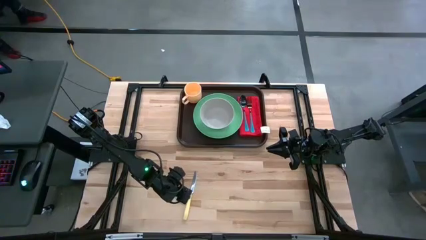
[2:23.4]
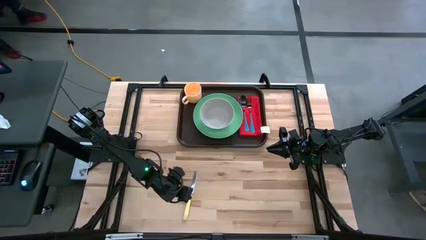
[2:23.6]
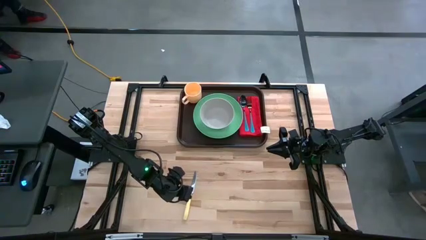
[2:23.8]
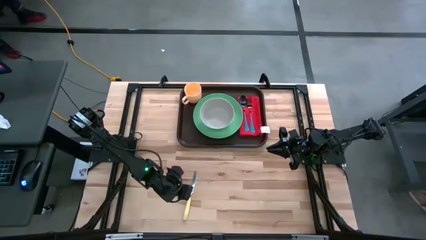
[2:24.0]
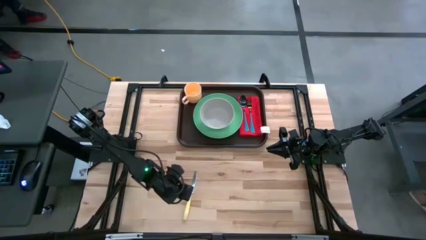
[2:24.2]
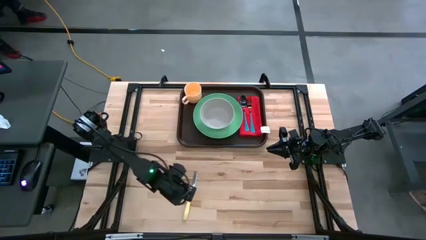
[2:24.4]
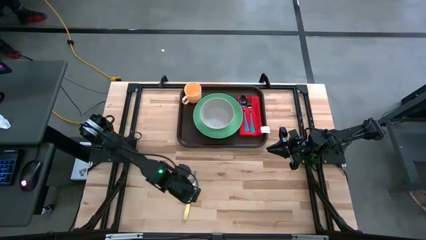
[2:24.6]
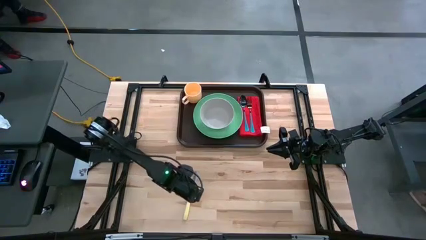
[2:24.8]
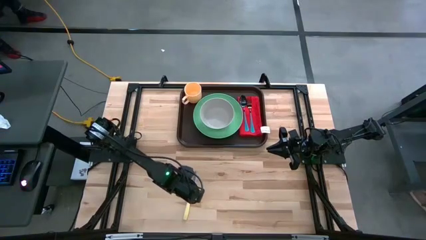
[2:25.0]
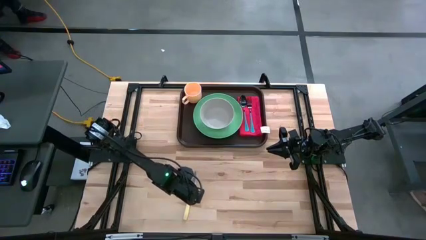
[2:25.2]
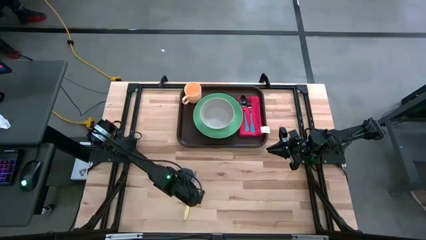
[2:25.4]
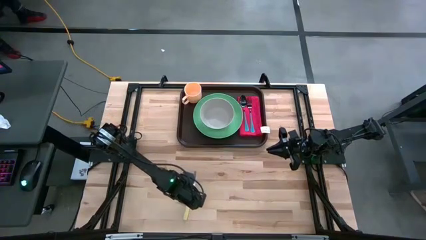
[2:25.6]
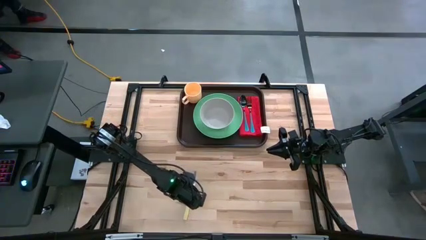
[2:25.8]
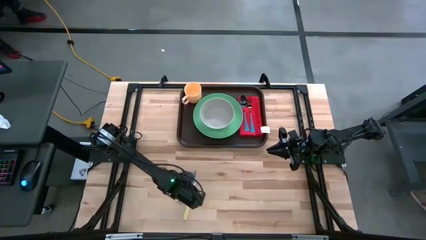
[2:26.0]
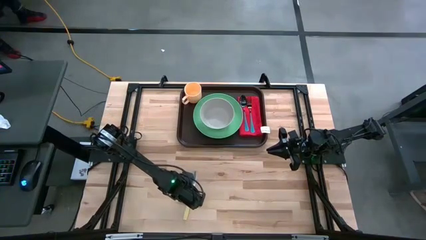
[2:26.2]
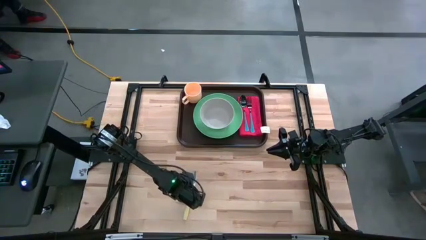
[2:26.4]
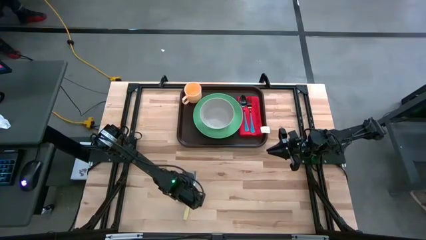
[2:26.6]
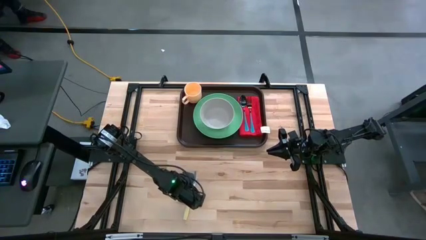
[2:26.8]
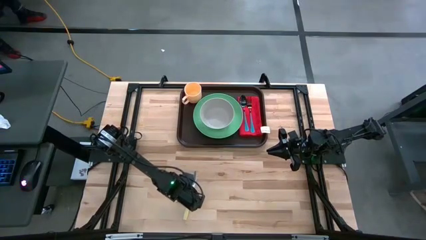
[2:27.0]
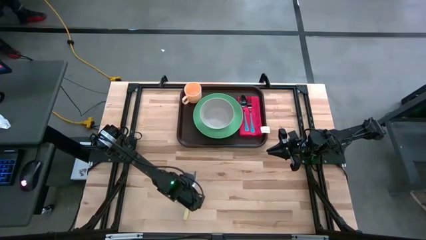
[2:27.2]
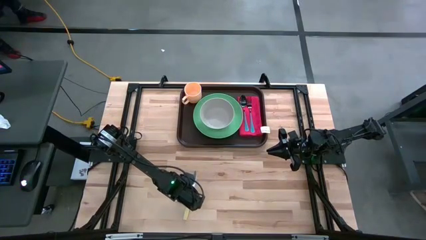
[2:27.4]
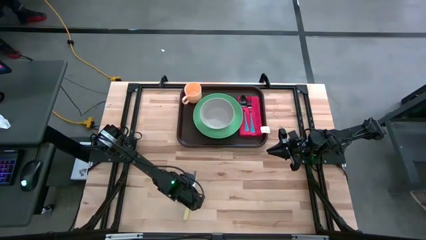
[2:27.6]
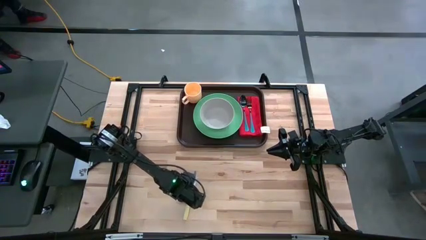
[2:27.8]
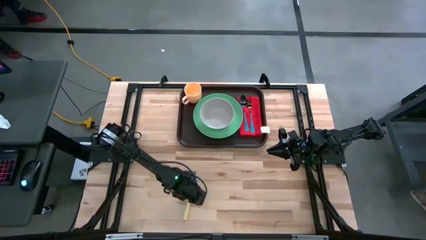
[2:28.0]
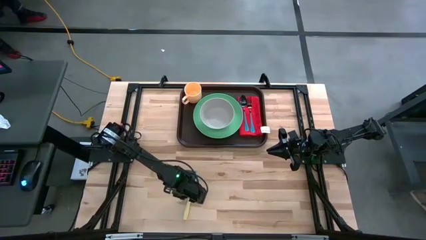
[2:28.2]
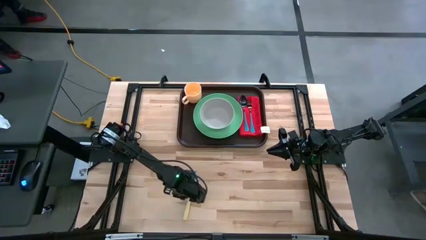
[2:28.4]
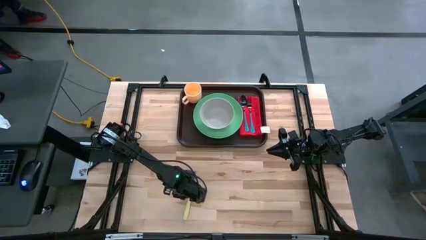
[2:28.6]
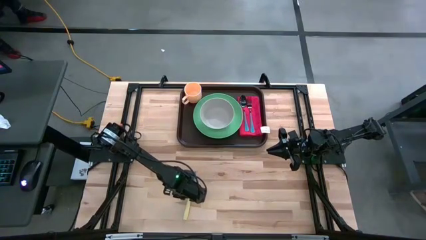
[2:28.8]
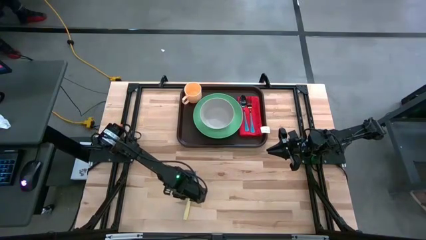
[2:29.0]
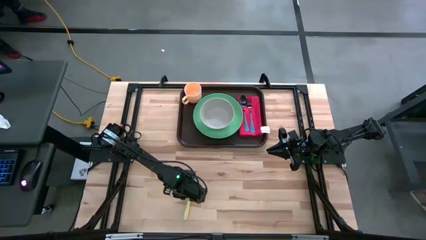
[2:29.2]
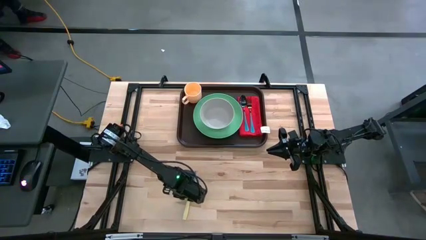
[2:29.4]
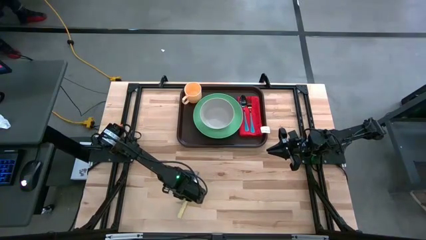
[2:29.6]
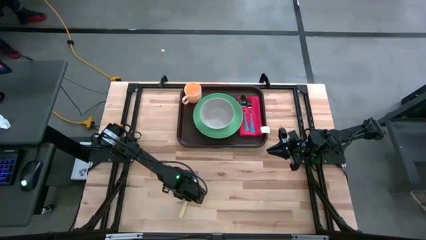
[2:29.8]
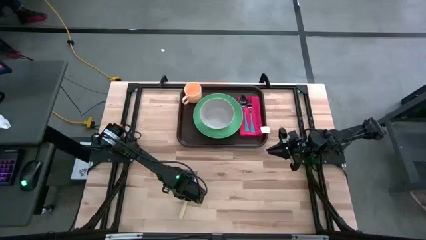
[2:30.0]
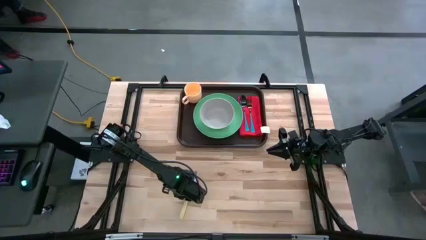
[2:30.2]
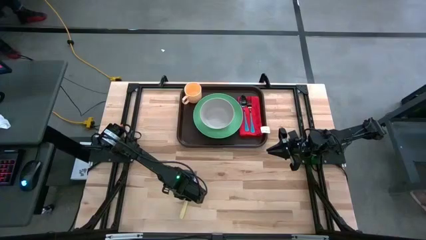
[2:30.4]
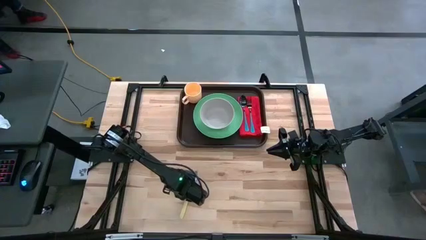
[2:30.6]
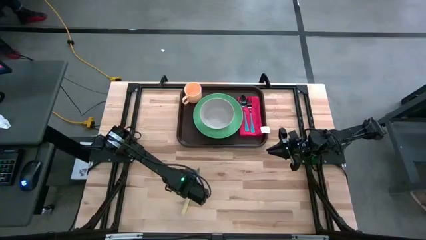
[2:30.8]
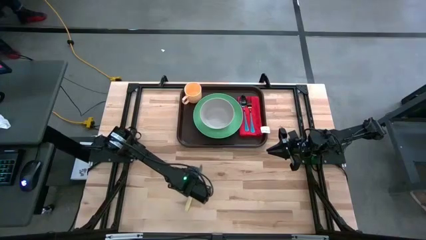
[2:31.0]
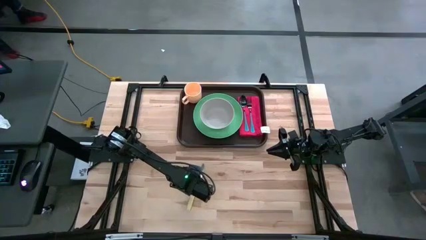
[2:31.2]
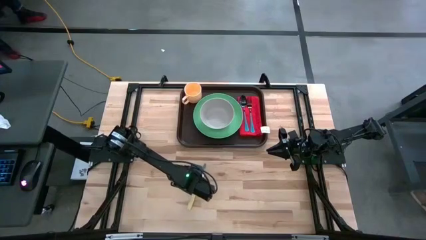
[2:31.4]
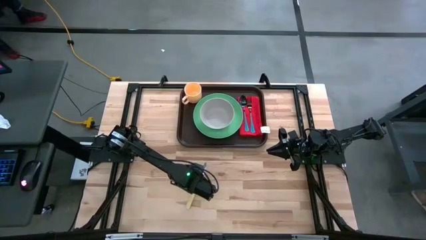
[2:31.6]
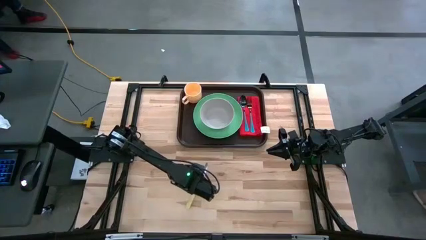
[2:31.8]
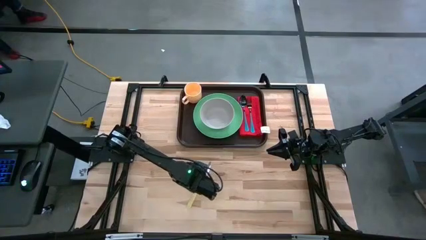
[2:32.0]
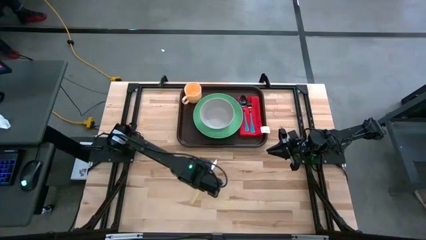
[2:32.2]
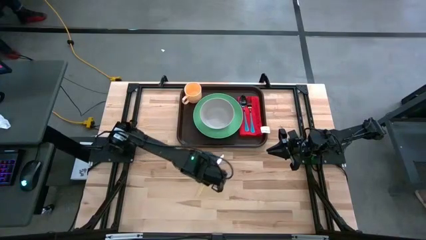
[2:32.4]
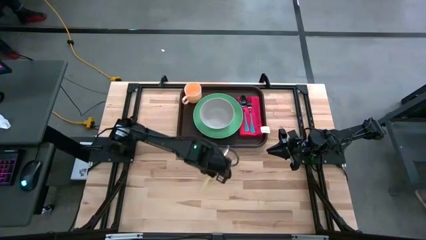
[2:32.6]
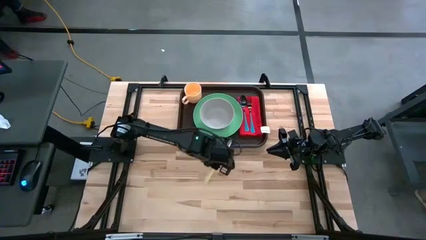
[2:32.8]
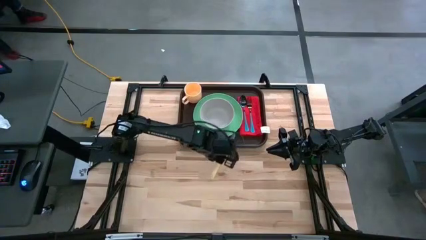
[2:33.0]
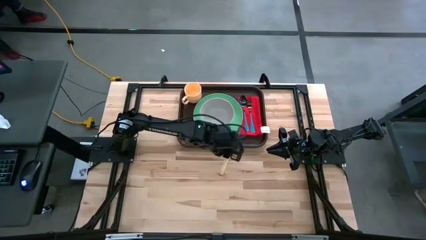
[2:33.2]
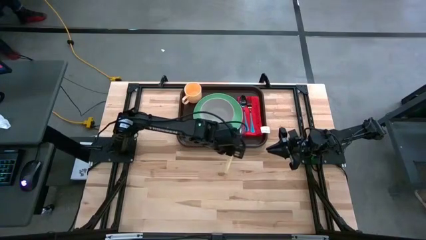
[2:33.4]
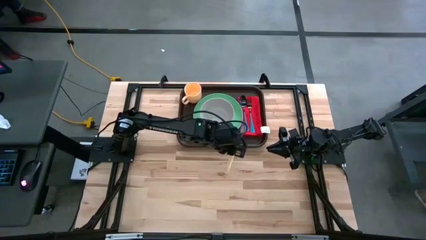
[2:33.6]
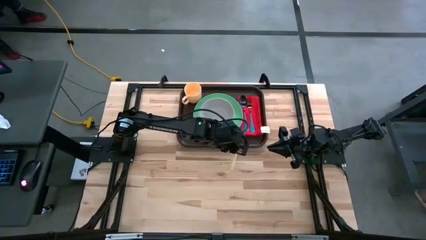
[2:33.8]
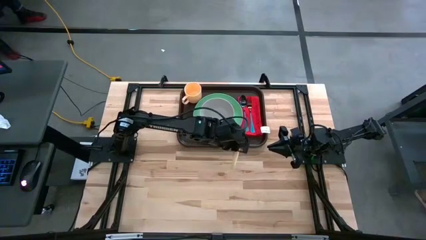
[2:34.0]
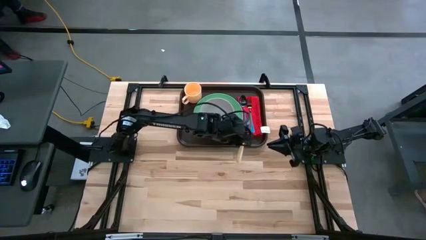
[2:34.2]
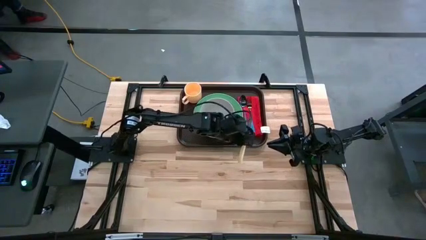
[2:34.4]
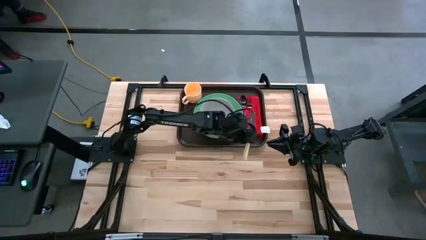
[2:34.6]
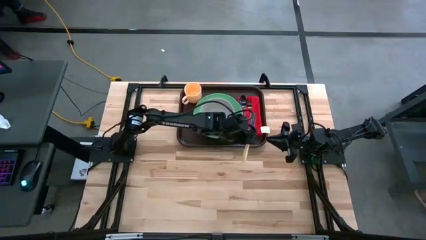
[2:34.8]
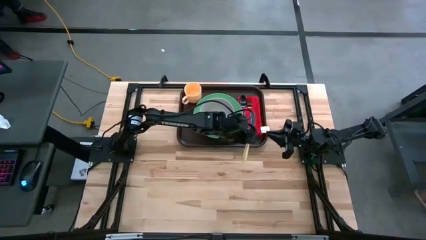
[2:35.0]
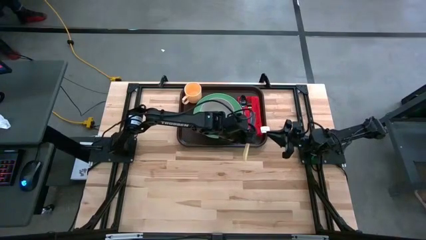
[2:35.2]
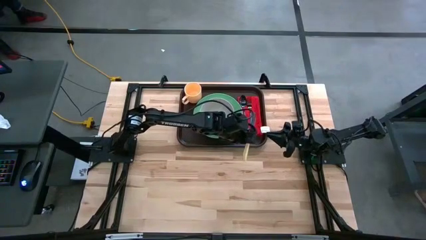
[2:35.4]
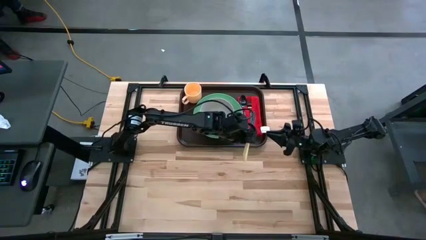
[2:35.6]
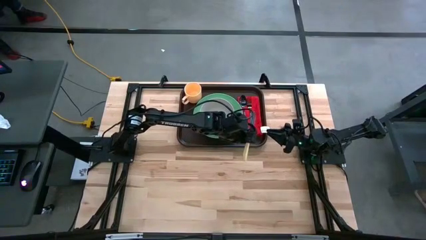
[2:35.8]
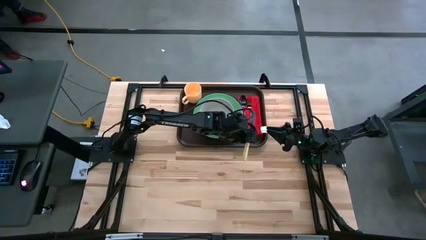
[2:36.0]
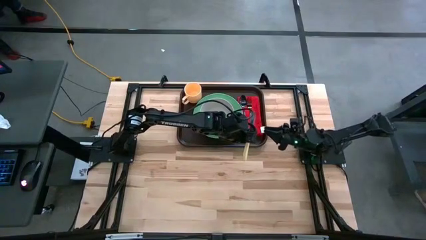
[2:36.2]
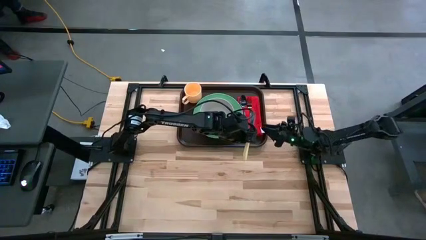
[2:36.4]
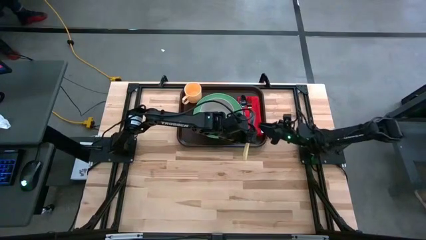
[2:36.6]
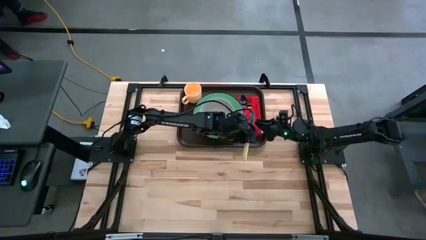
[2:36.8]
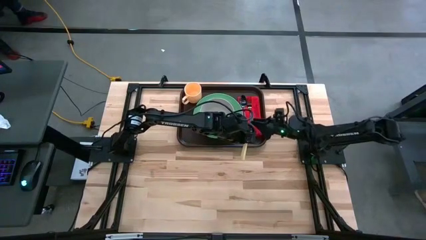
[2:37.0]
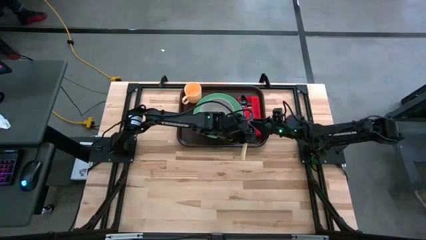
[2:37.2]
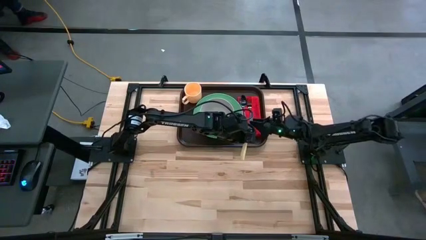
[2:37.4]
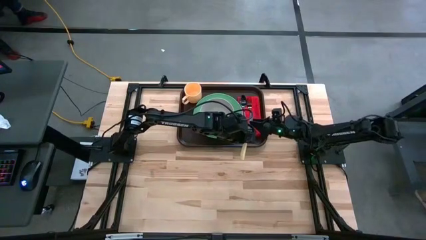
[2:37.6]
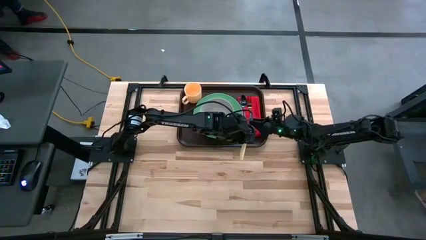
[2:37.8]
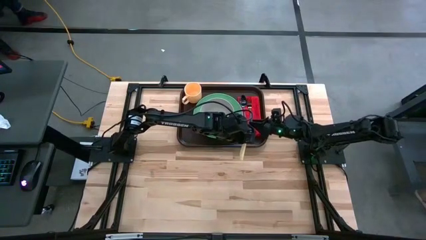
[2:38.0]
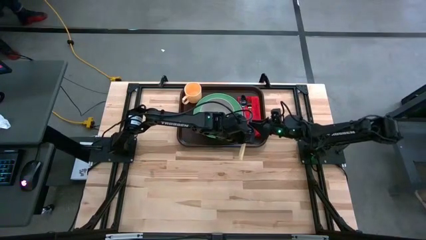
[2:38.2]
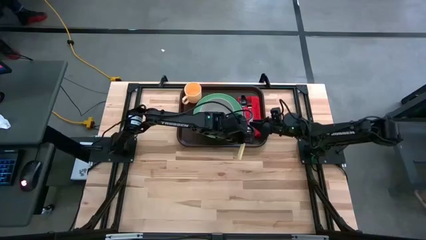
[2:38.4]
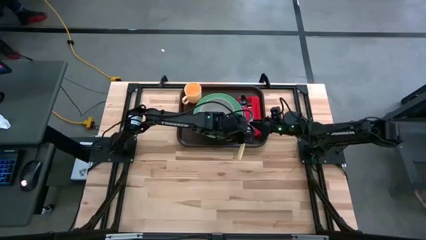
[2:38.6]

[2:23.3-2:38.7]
Task: Set up tray
Put the yellow knife on top of the red napkin to the right of the blue fork
